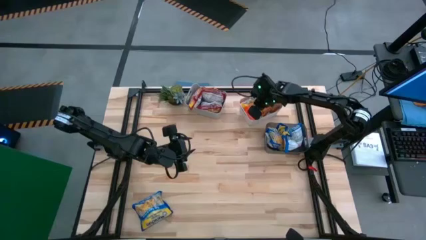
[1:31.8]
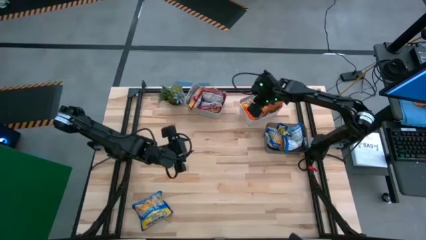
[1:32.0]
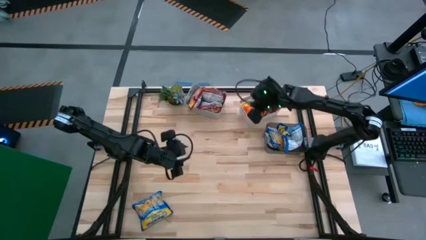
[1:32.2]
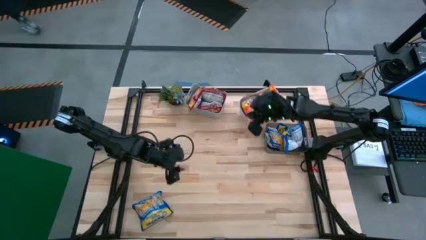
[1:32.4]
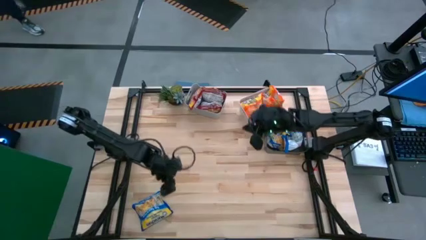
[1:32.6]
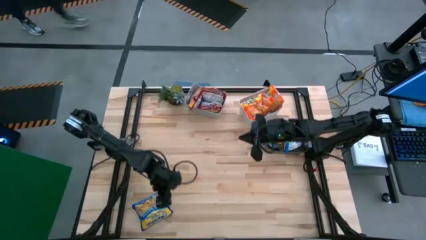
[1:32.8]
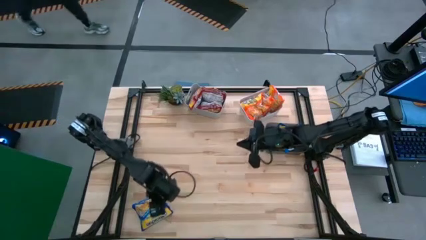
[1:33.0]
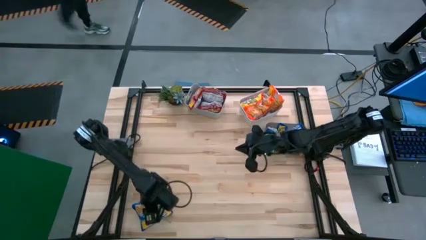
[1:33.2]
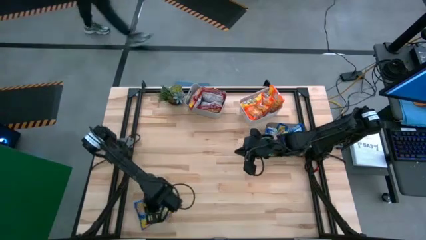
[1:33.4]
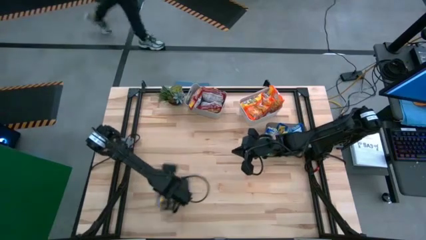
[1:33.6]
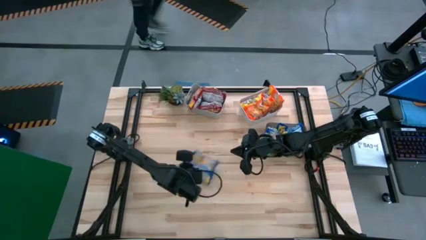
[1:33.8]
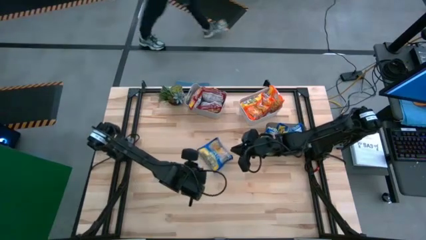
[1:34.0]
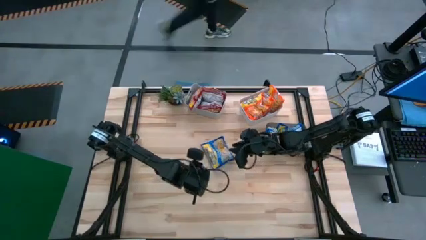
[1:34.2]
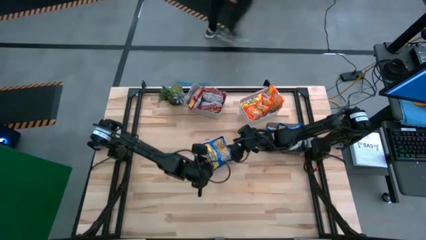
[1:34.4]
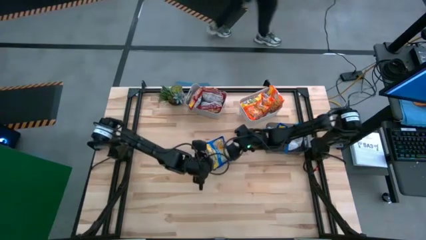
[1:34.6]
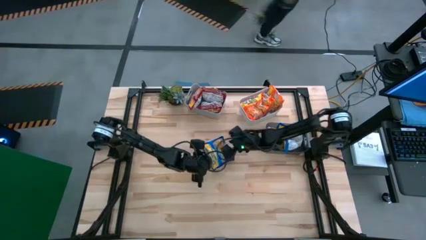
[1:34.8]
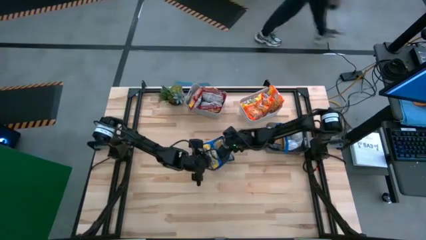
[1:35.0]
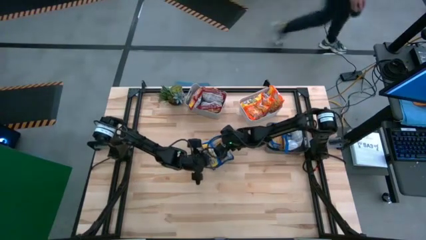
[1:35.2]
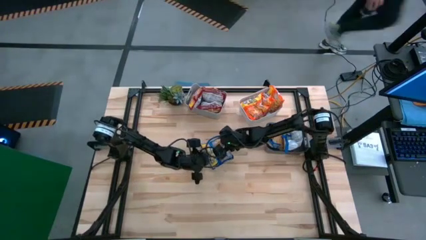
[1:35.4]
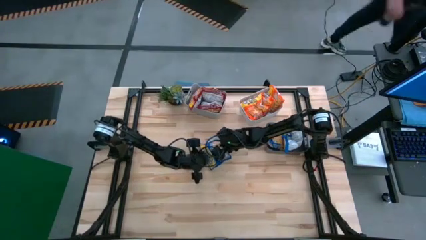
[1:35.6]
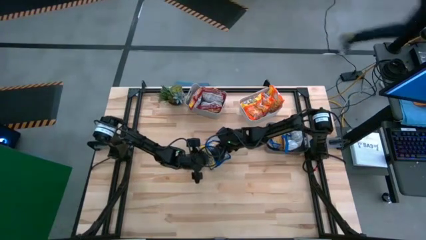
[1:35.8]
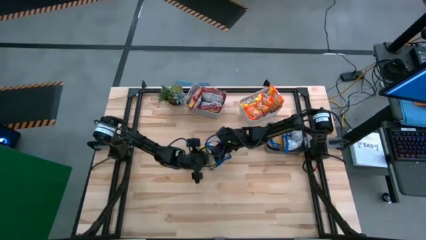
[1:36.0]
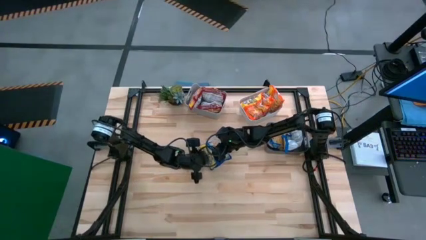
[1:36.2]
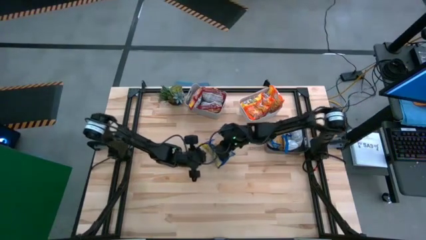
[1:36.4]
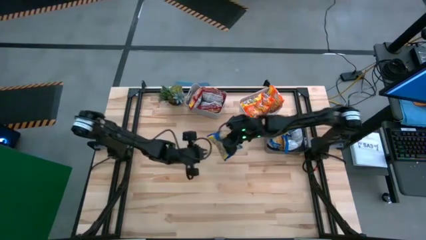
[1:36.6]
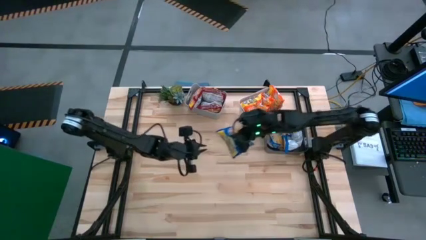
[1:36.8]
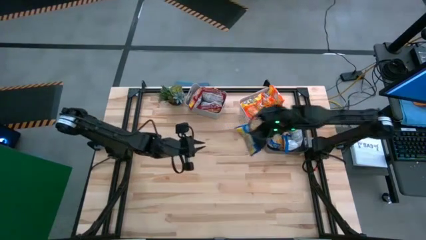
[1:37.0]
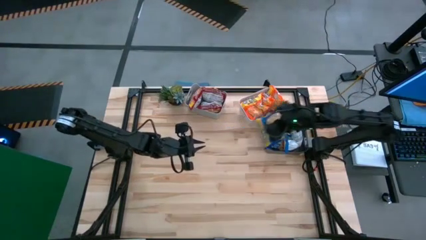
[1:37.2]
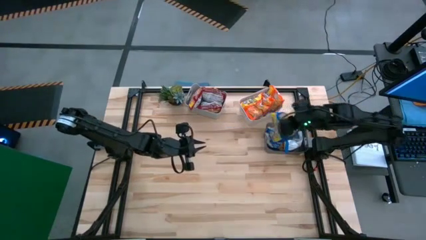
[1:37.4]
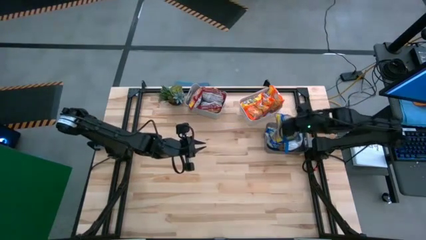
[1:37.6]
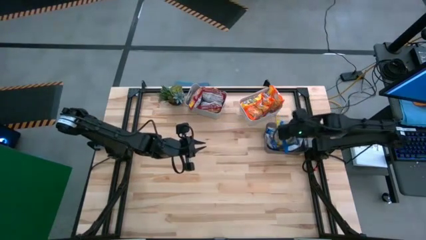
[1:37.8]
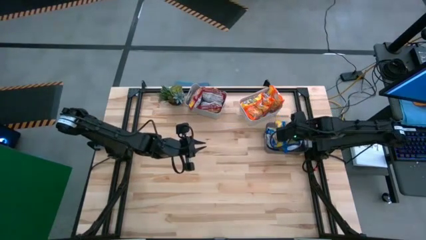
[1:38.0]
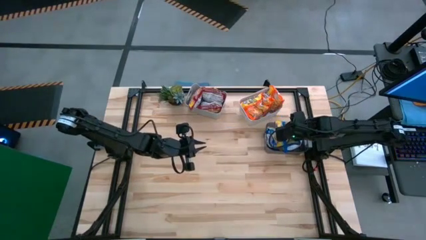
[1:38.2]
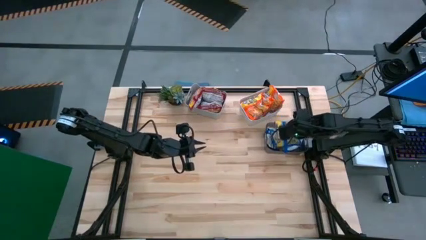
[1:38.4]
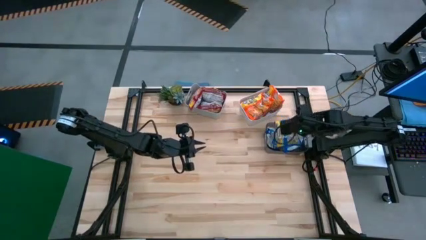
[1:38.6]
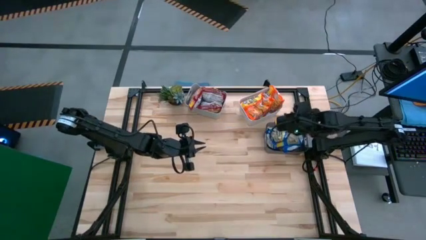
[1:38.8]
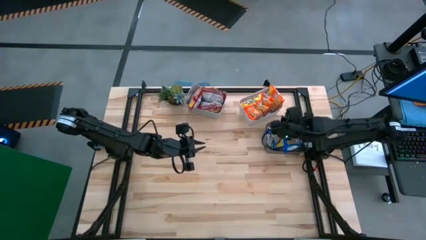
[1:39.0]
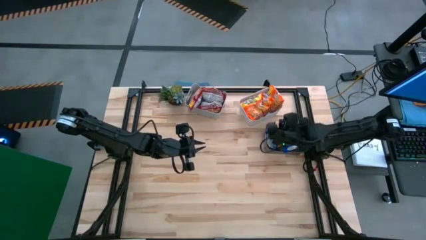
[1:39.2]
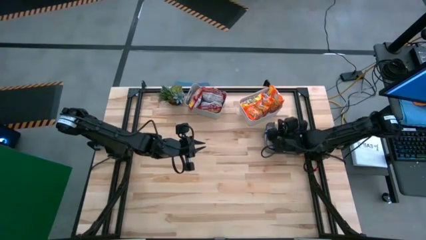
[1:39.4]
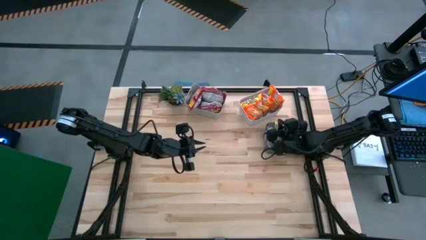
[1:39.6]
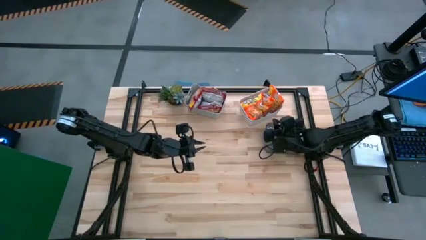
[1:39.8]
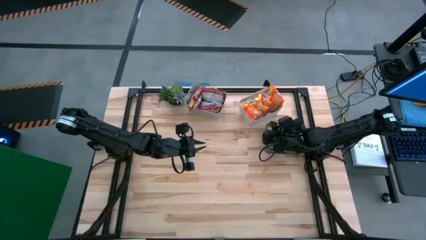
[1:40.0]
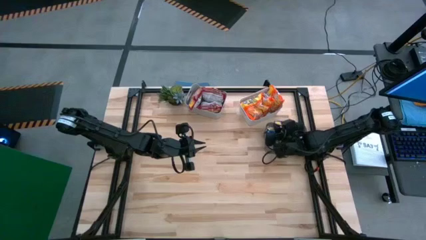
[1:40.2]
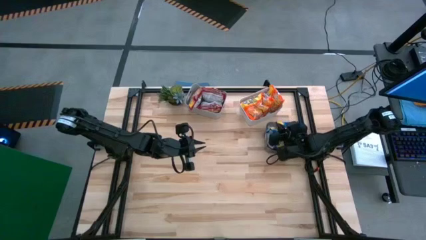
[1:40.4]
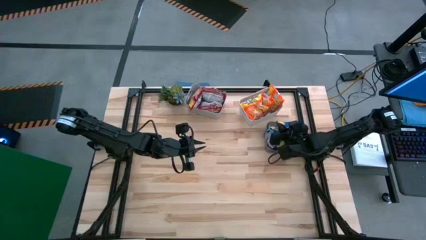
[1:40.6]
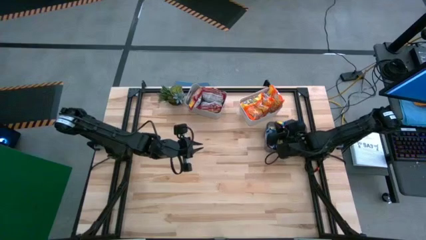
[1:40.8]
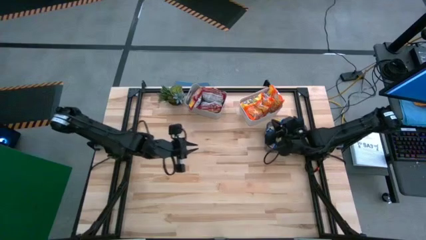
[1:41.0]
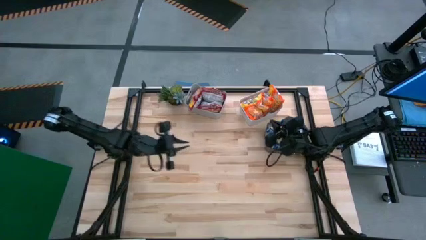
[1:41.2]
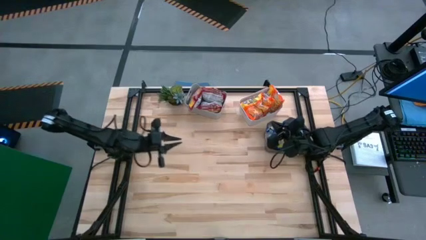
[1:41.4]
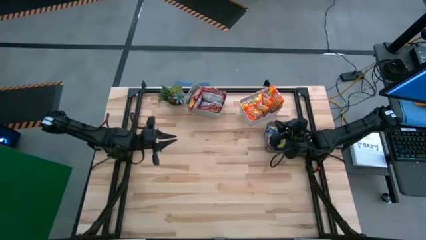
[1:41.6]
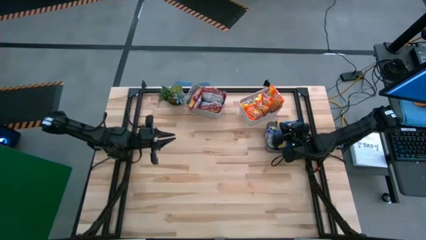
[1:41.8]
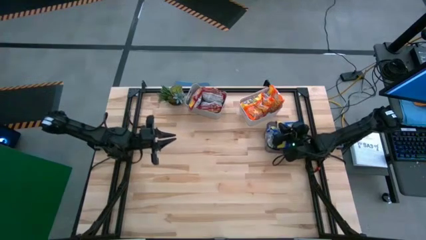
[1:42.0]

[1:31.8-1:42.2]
Task: Sort Maruchan noodles
Put the blue noodle pack into the black bin

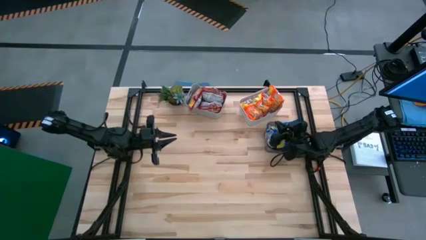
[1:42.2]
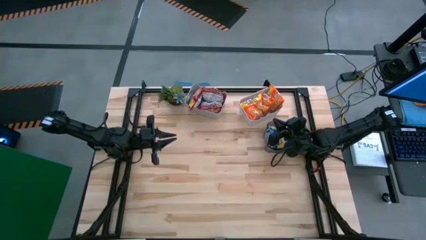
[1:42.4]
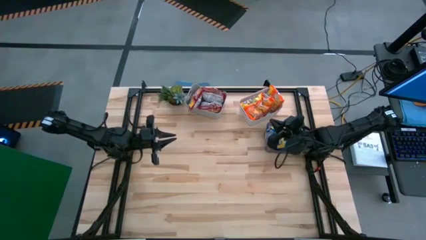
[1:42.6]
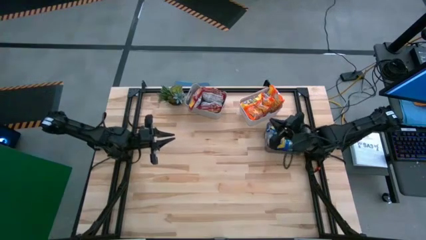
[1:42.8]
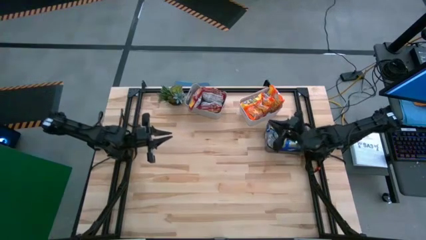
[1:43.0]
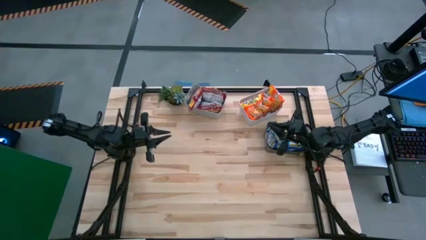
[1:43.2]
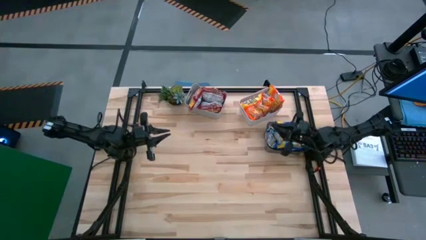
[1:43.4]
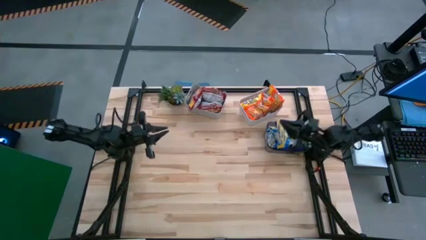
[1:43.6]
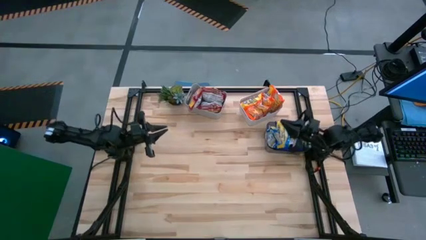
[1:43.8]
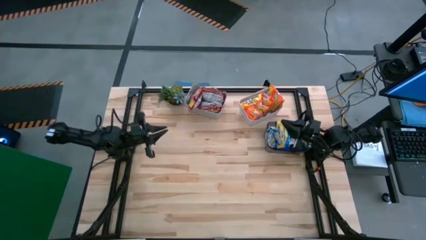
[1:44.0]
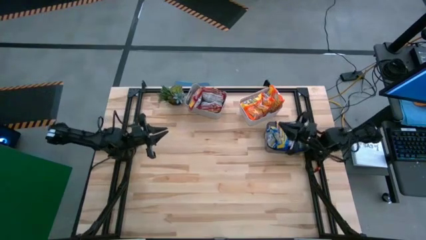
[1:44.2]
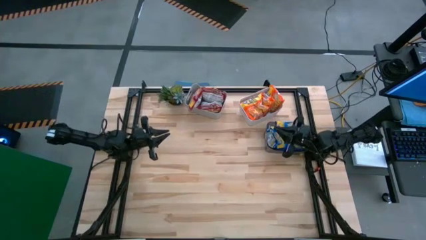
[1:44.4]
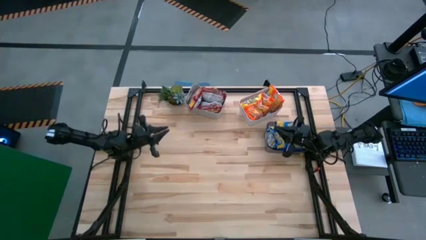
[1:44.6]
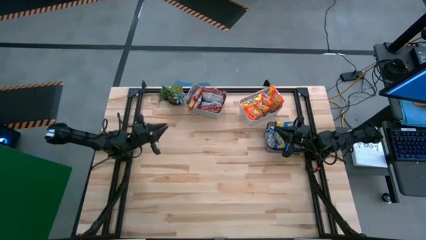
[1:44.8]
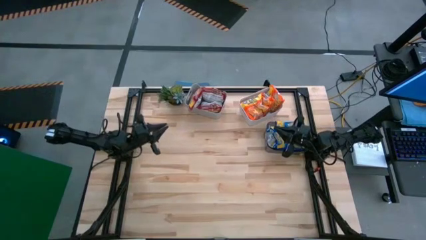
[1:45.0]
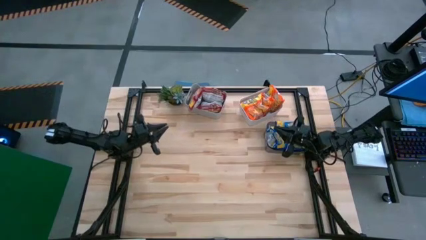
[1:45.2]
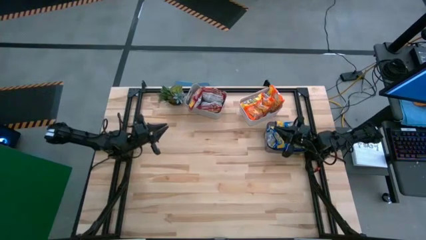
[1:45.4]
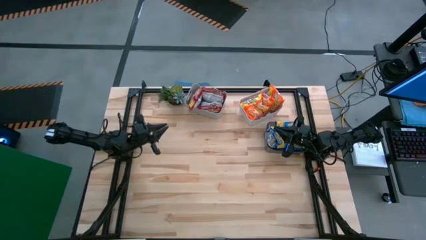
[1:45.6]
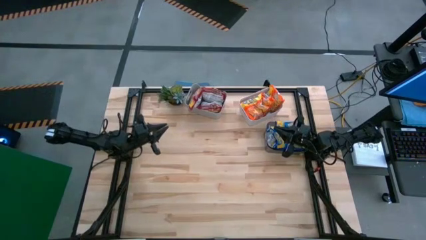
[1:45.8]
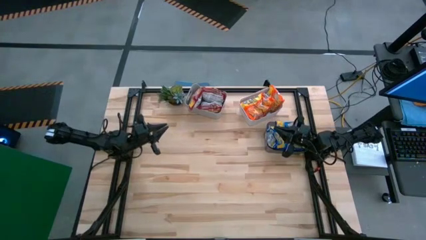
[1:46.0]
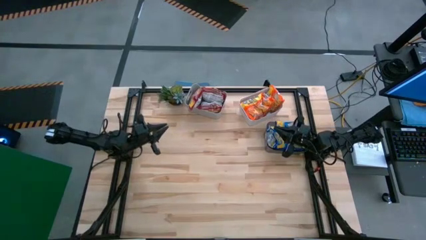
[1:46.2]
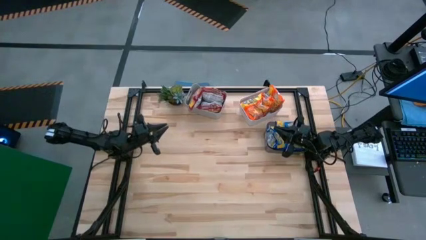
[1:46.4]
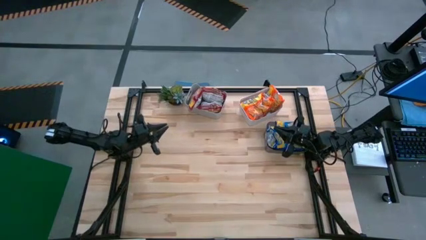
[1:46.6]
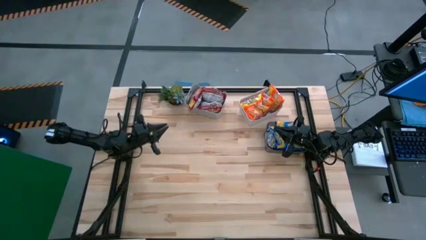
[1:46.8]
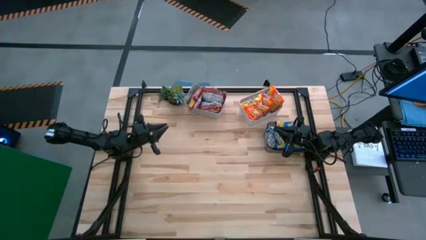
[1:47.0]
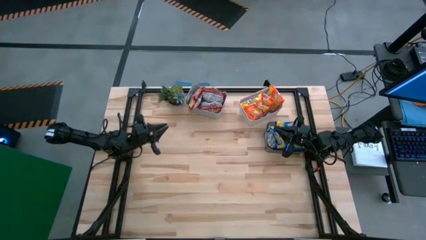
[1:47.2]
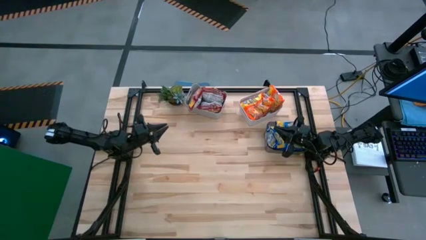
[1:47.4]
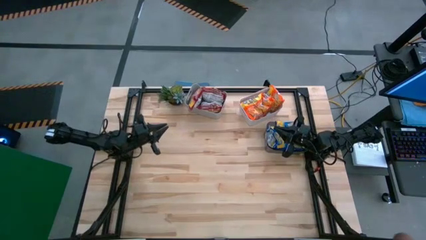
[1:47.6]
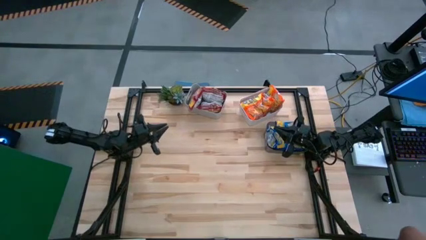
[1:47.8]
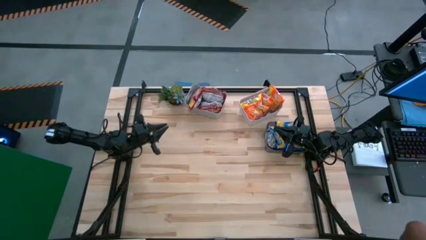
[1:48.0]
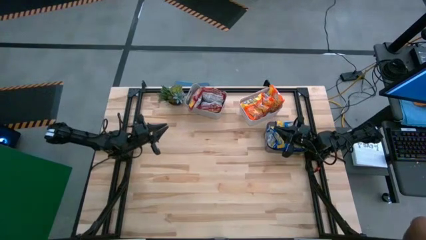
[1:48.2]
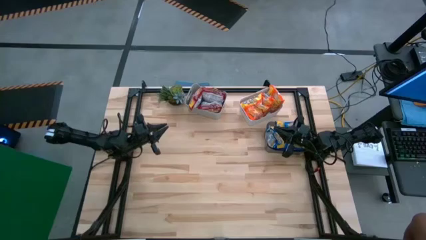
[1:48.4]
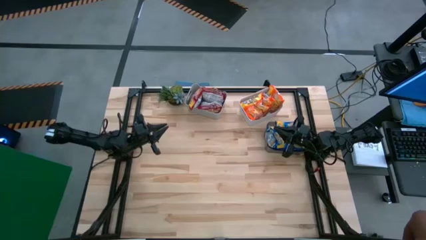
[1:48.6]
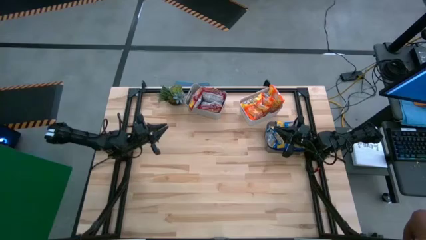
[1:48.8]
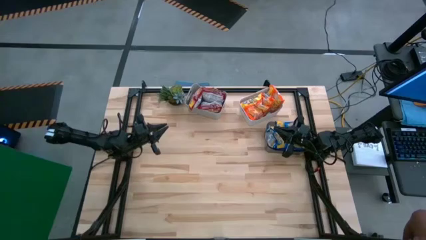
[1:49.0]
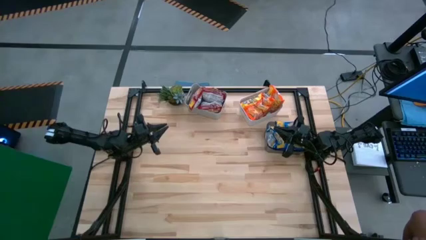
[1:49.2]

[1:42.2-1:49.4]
Return to Home Position
